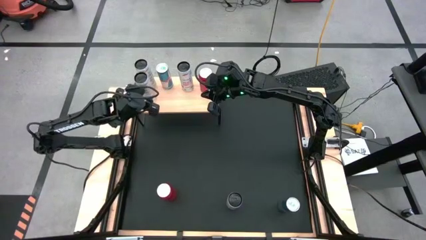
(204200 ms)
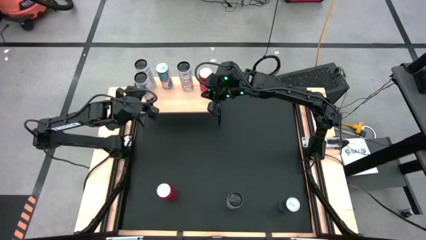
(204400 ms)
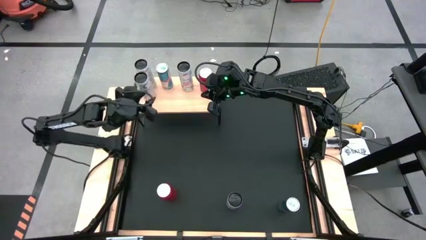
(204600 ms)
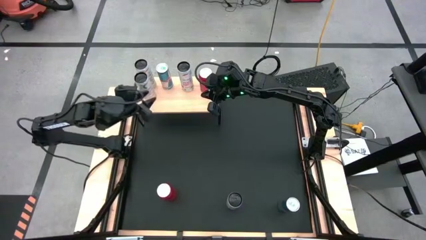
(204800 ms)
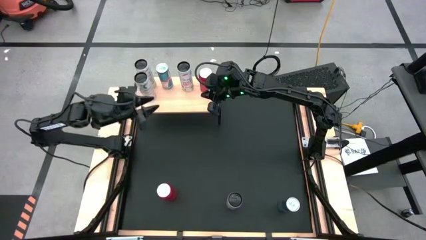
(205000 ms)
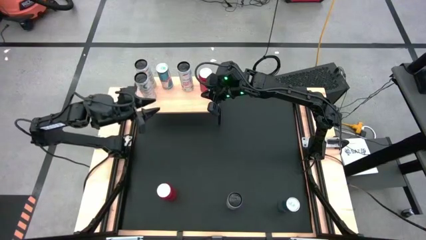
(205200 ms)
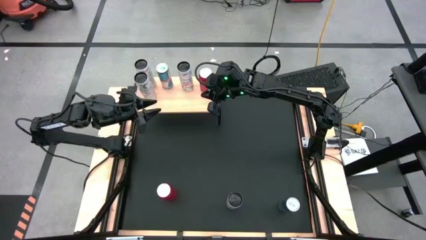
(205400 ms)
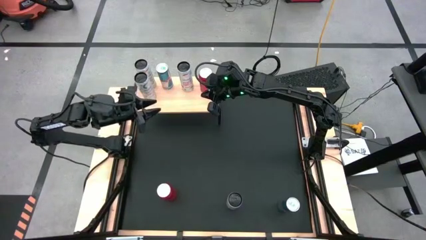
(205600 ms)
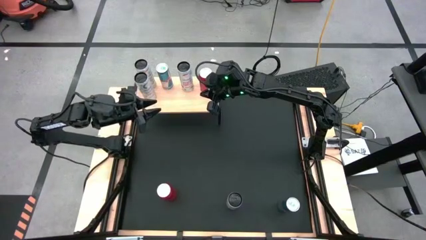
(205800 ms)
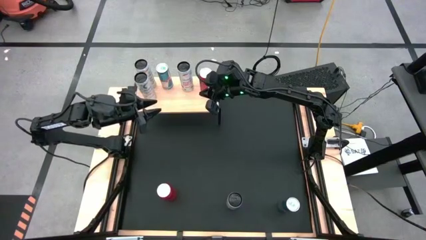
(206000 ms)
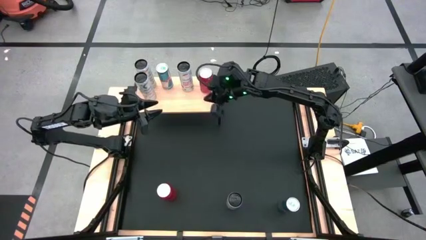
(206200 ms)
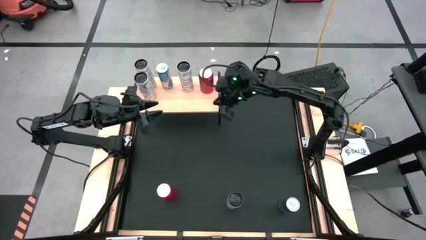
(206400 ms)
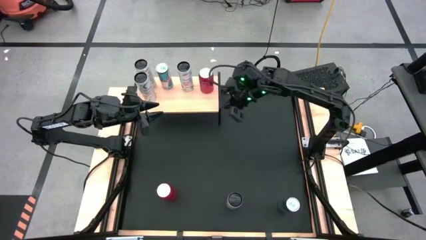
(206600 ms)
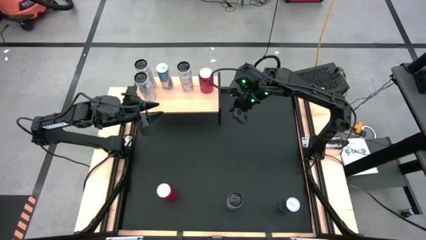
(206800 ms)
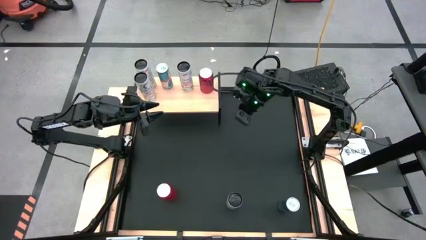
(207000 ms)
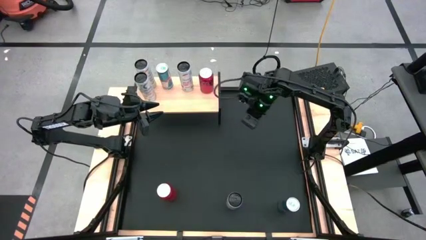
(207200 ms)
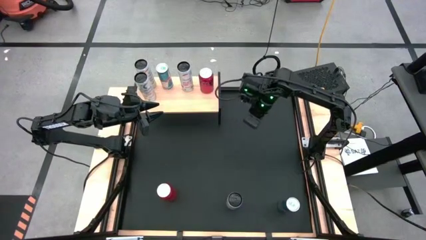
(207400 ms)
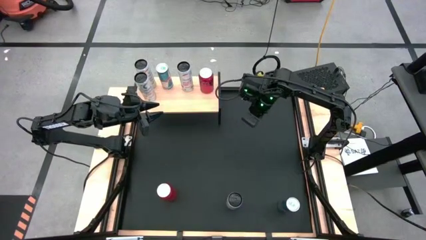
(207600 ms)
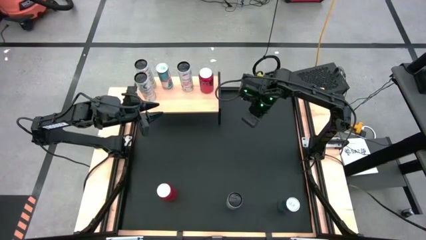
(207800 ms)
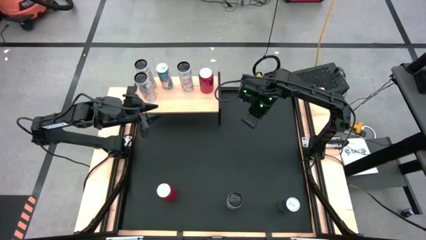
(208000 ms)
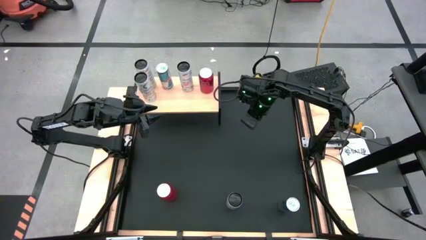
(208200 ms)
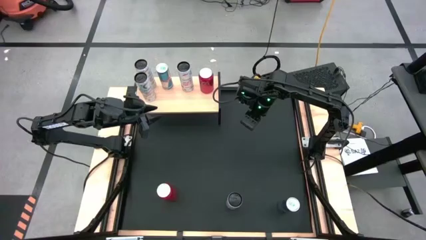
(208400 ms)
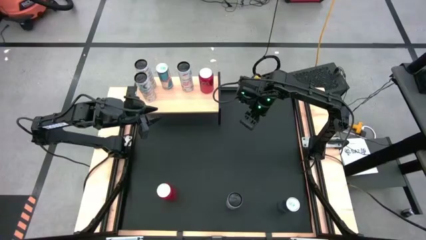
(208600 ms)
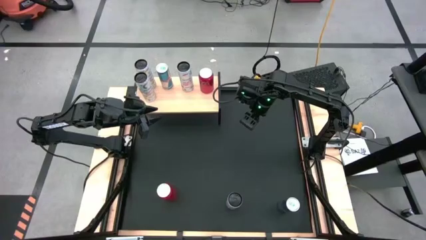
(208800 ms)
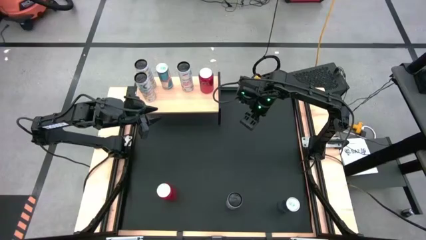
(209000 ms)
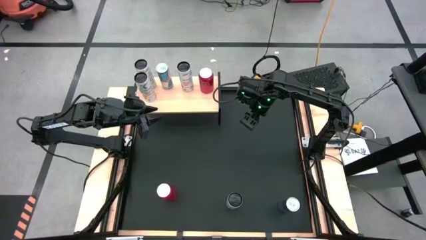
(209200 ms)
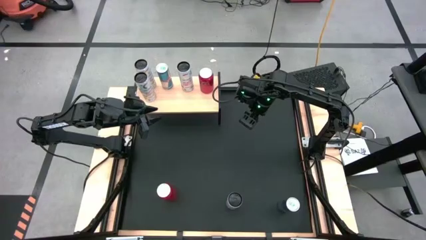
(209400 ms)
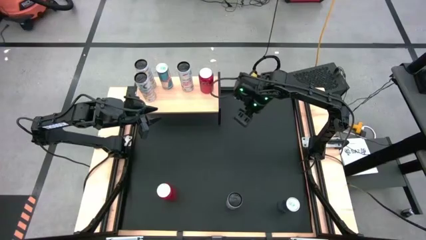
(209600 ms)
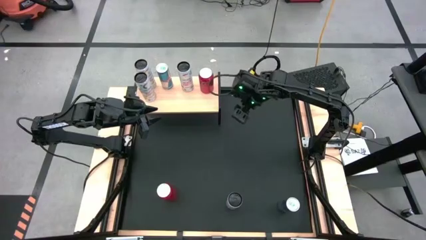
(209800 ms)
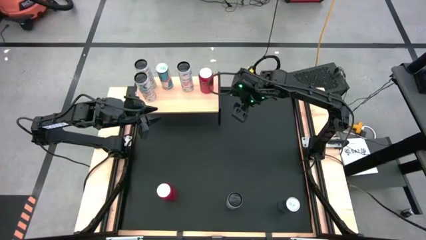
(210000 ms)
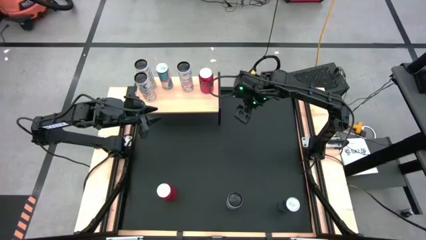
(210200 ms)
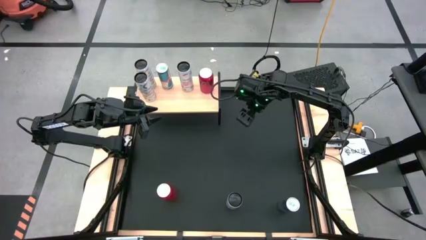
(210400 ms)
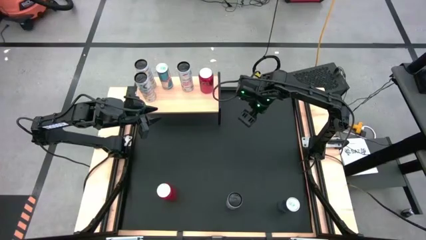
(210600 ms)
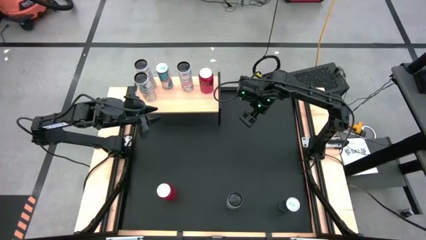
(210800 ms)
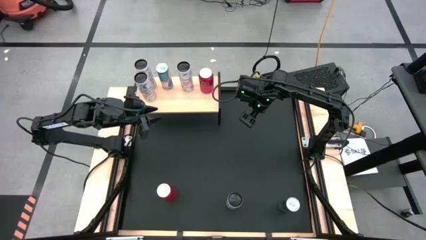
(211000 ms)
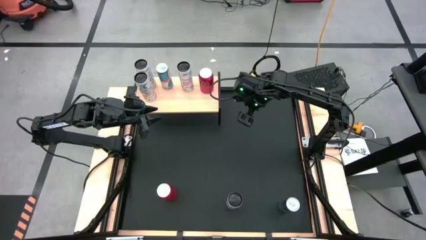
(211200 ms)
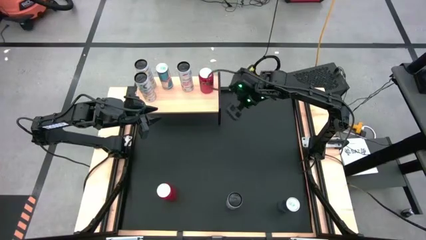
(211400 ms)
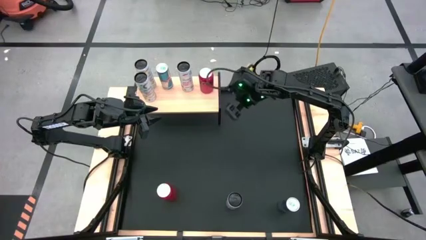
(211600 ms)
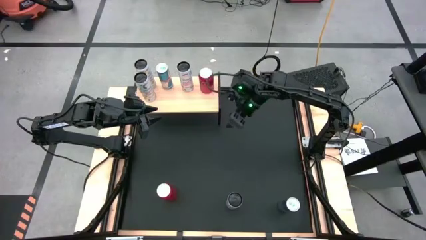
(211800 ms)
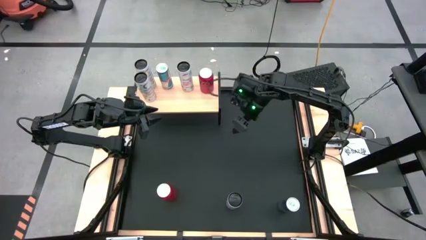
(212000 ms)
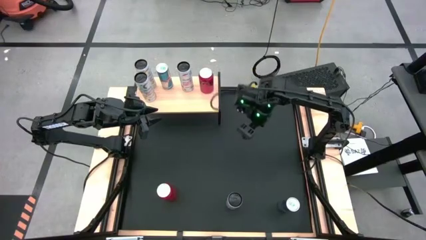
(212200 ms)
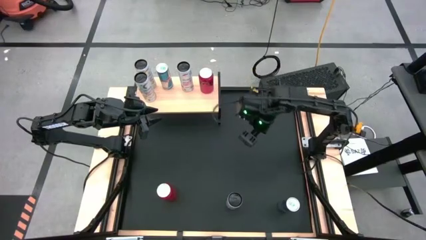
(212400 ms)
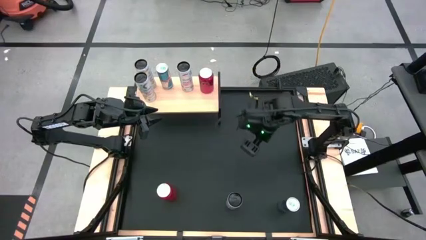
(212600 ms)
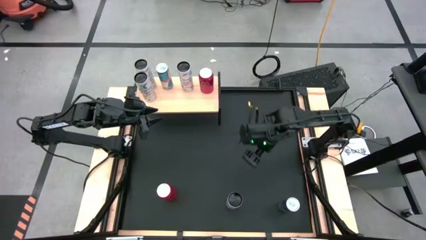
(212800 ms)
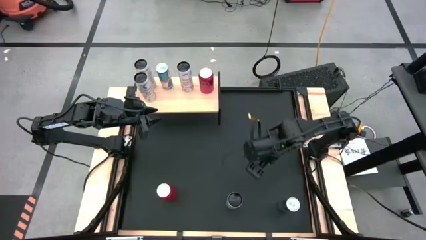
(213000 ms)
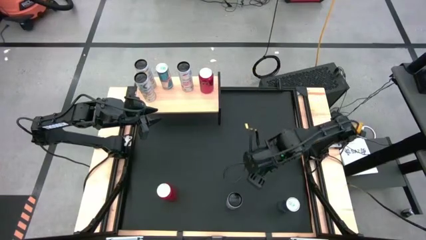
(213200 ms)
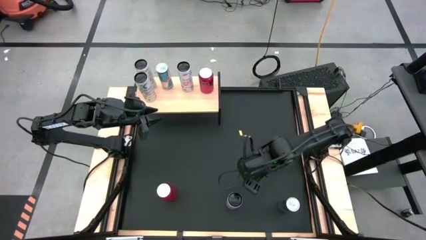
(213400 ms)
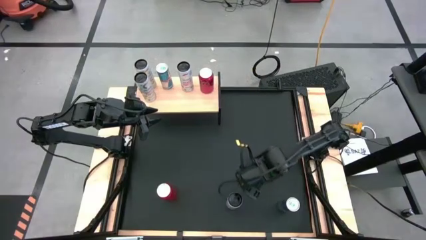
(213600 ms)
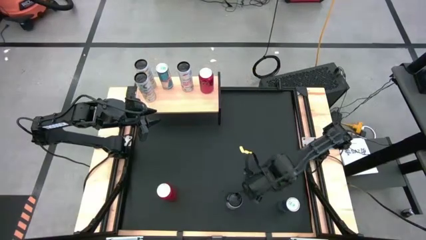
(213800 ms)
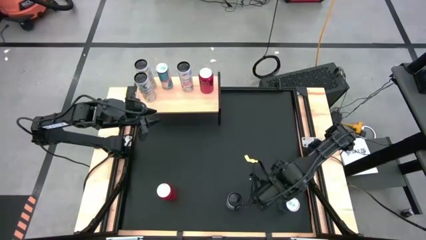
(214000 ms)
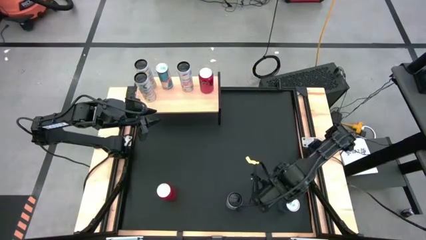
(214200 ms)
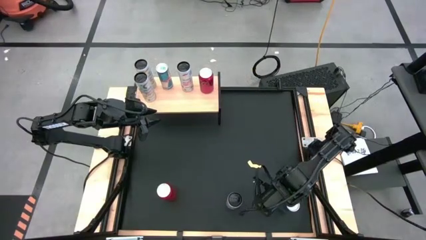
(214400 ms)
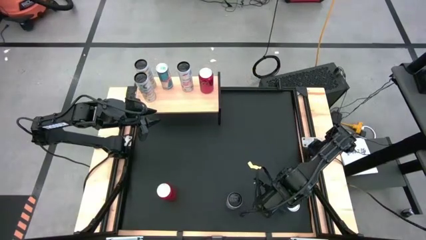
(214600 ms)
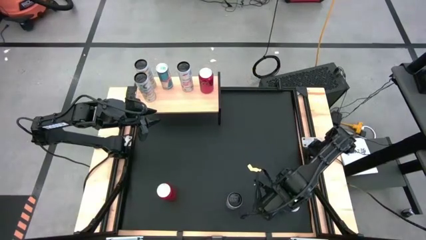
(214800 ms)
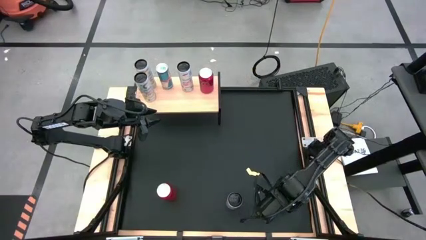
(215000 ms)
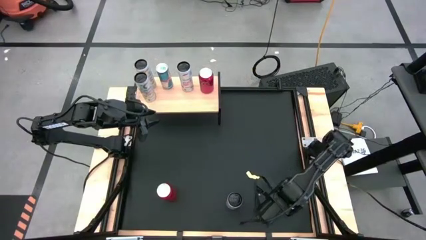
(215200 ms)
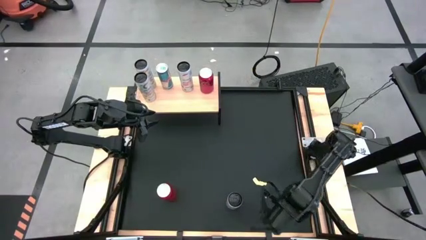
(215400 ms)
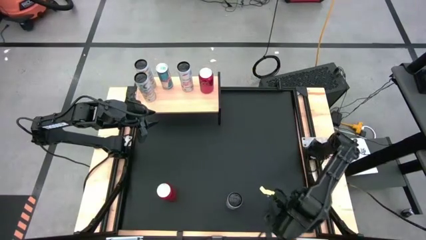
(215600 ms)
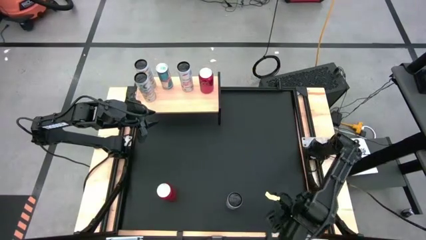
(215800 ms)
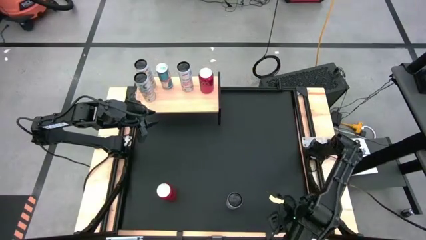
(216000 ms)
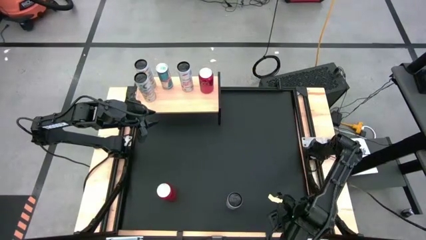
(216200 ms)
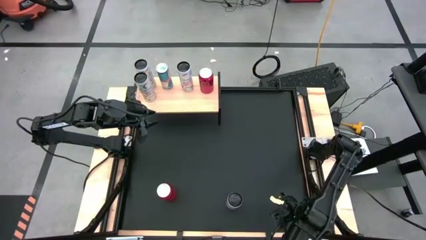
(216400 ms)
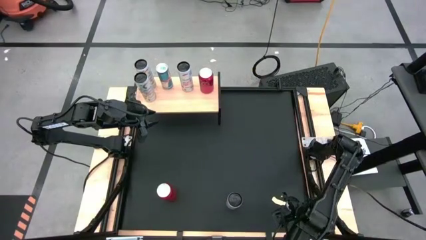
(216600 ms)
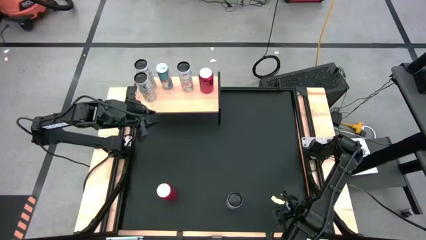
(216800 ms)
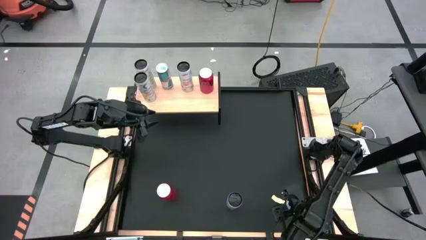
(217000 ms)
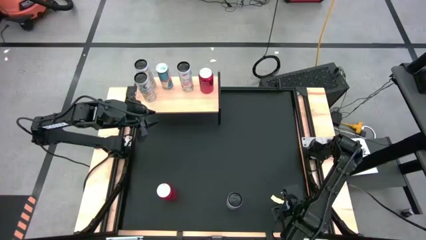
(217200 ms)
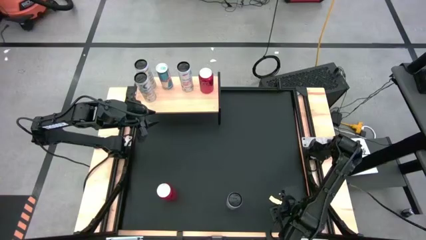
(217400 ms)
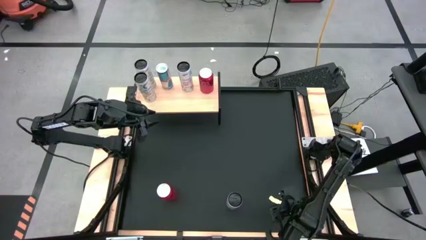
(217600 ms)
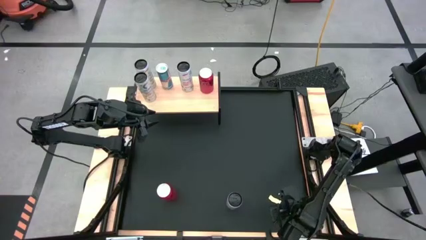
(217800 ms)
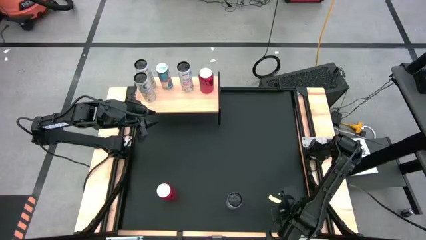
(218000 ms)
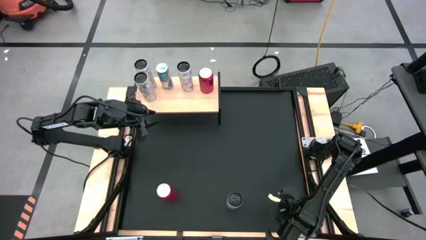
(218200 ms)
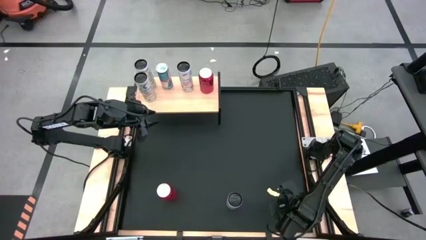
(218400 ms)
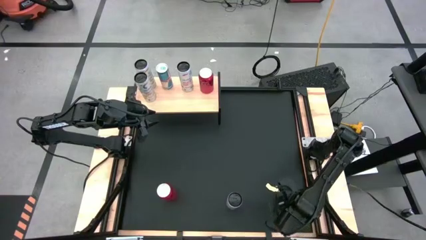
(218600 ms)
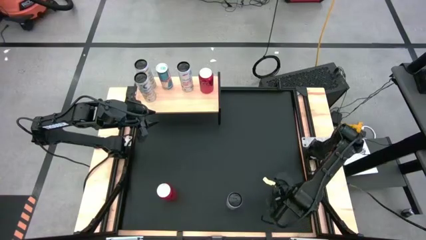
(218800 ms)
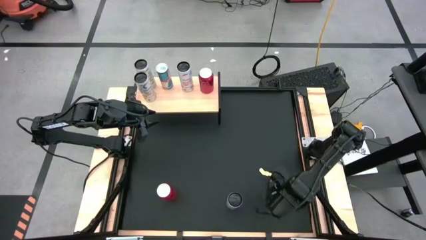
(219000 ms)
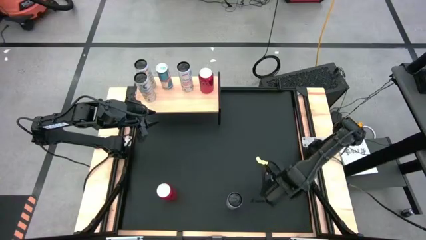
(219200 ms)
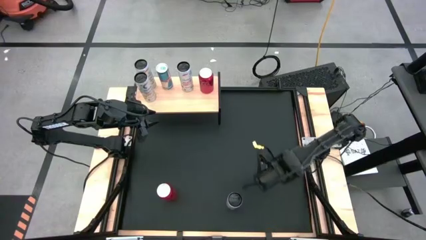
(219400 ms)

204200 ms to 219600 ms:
Task: Place canned beverage on shelf
Put the blue soda can on the shelf aligned with the blue soda can

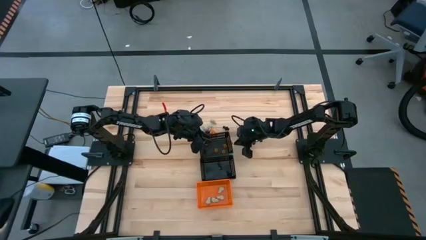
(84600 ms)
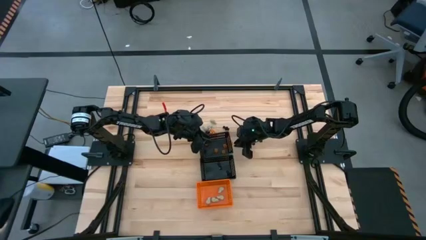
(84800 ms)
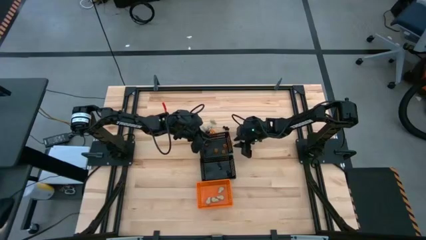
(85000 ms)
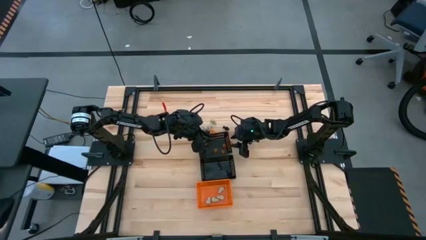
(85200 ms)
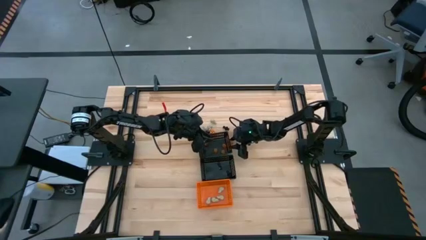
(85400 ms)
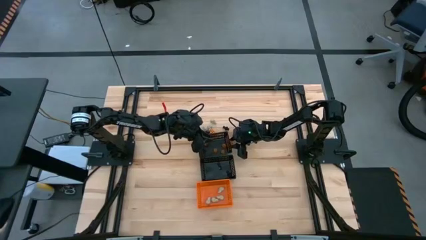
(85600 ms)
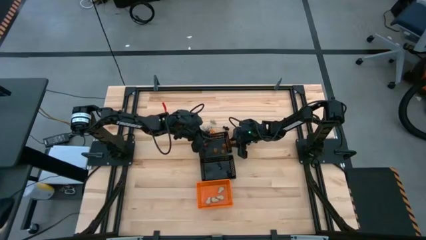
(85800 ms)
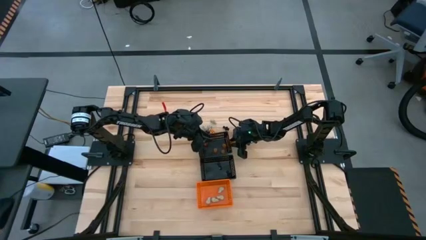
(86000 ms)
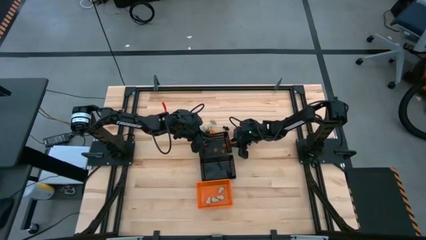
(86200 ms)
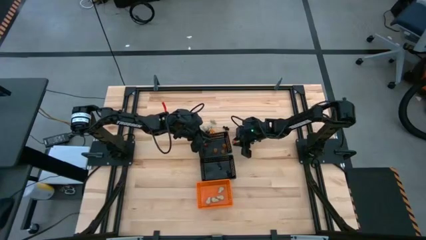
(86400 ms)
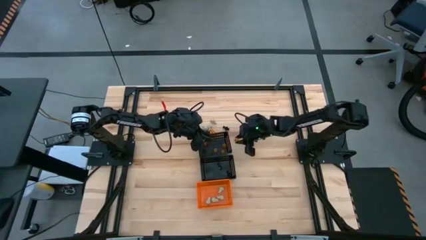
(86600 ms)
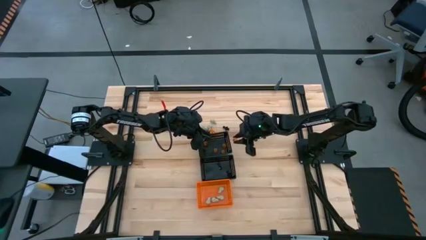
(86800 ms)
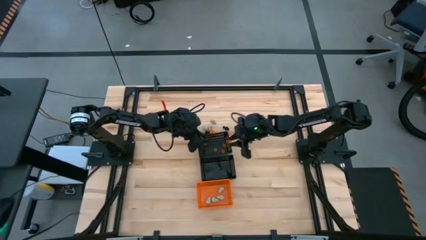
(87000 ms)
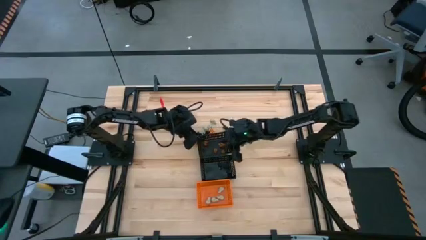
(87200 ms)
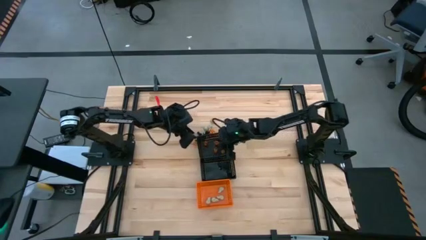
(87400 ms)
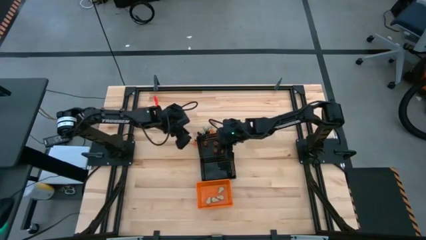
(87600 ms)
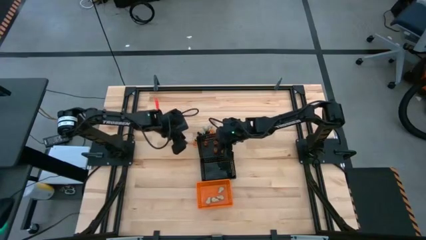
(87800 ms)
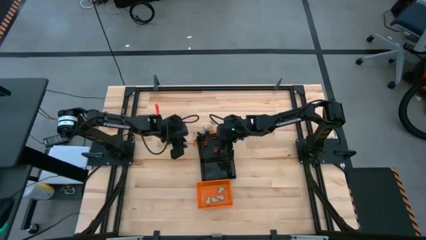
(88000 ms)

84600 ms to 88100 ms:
Task: Sort Halloween decoration
Put the orange pumpkin toy into the top black bin
